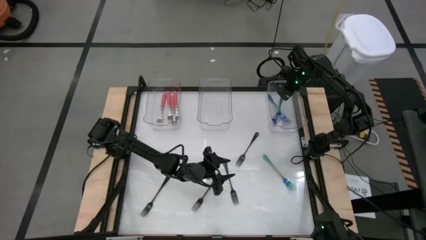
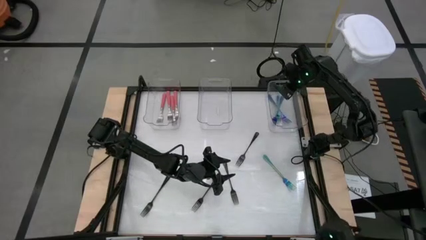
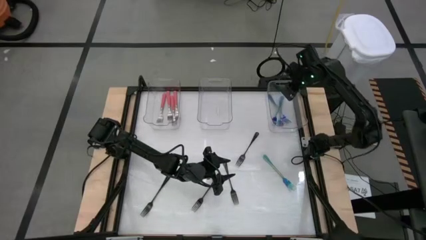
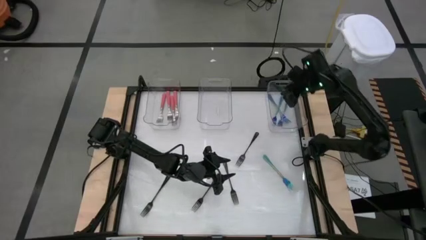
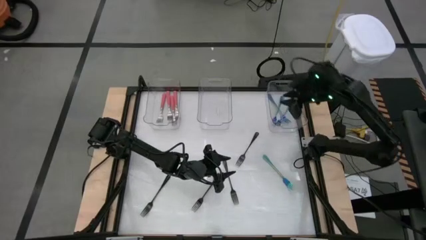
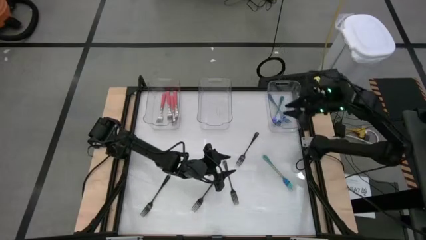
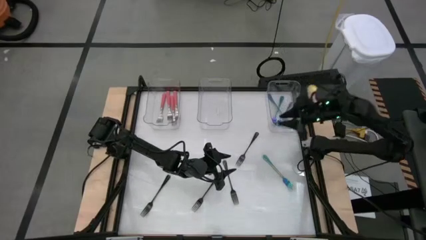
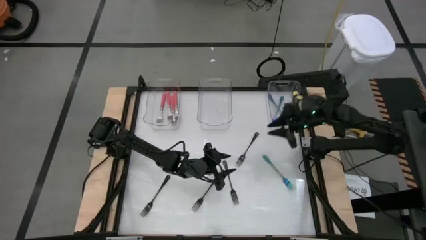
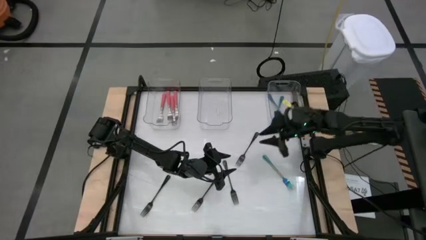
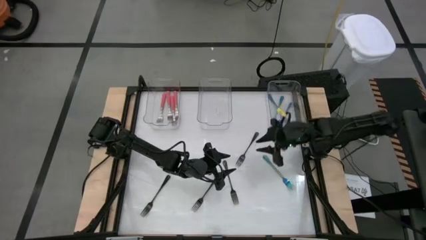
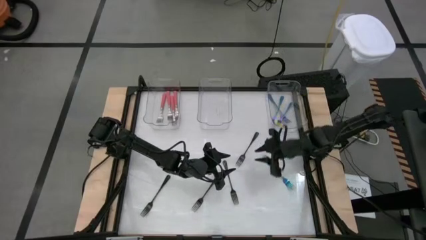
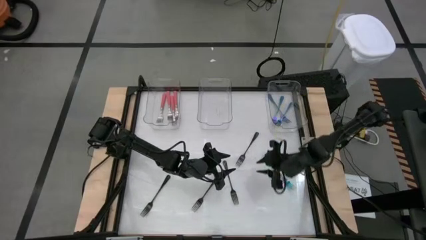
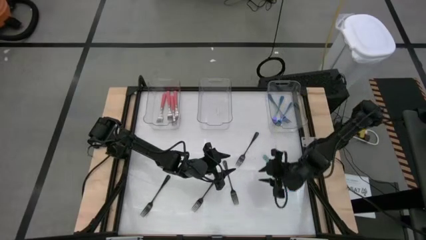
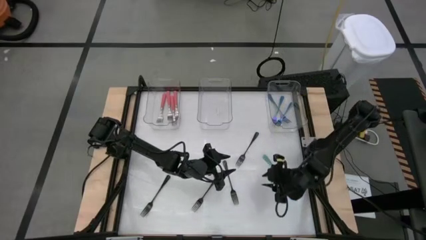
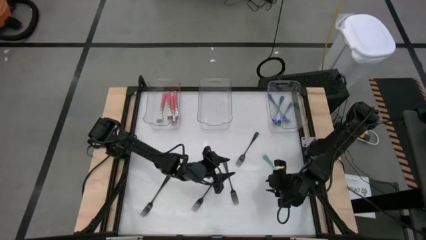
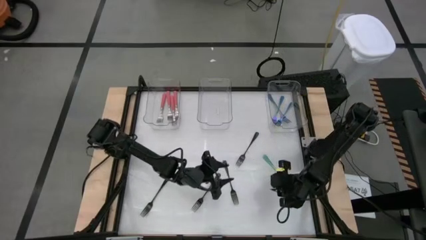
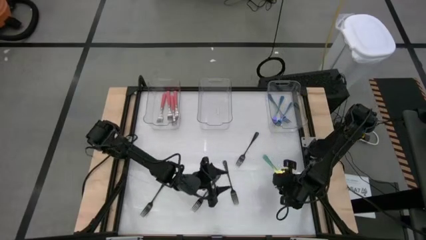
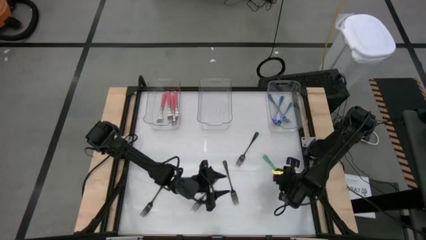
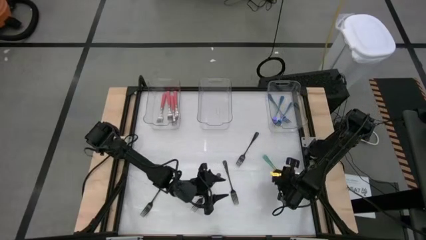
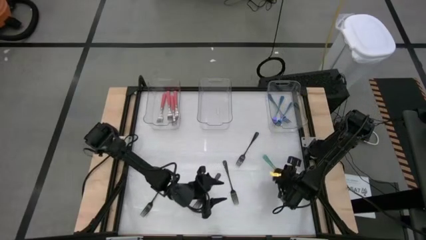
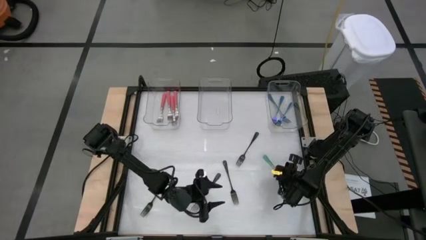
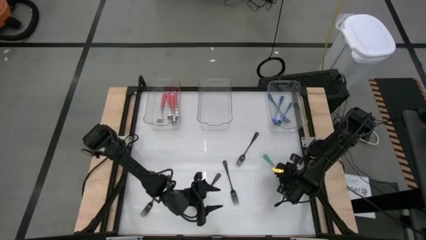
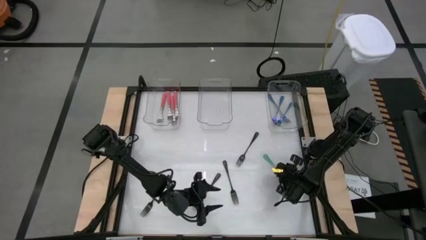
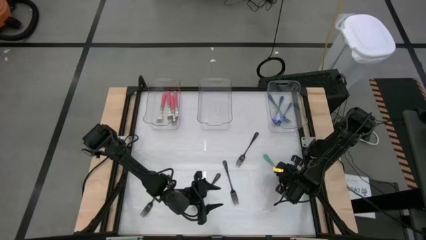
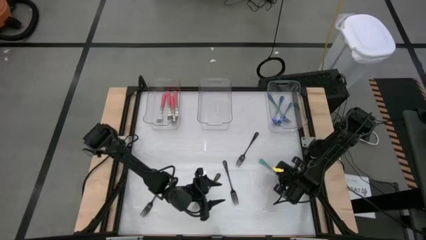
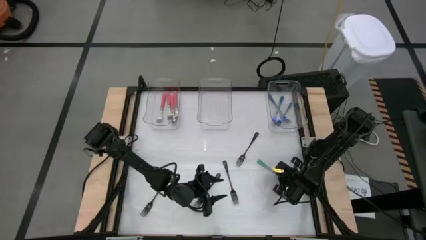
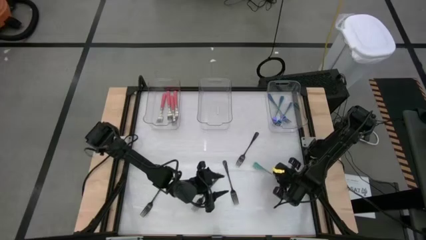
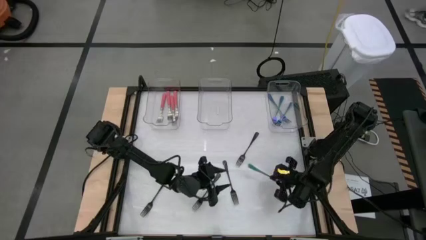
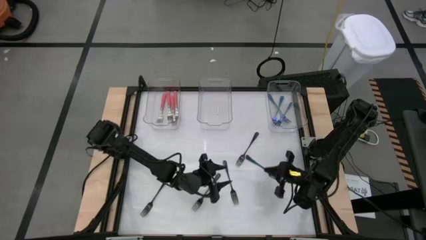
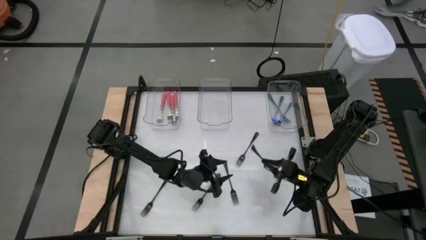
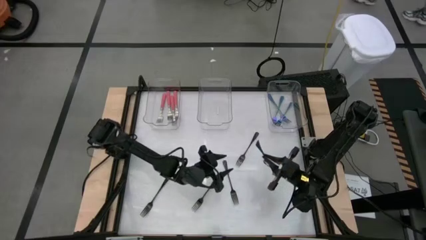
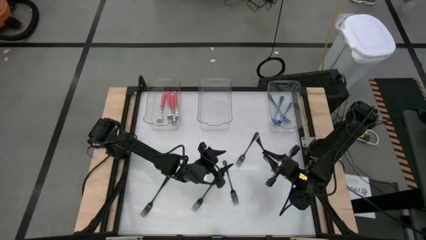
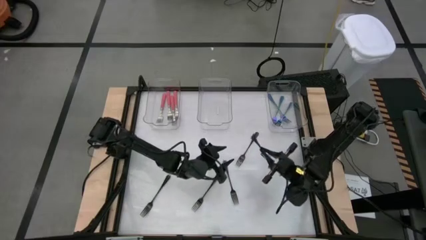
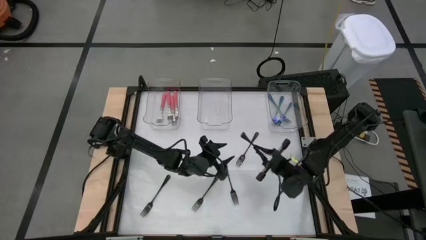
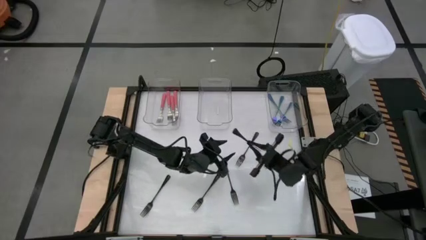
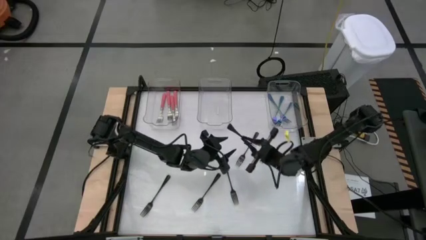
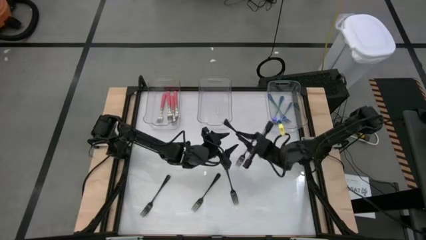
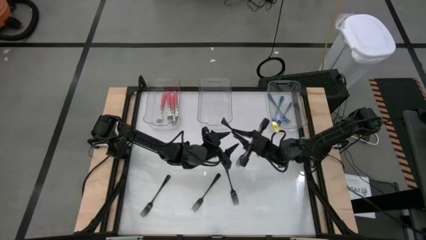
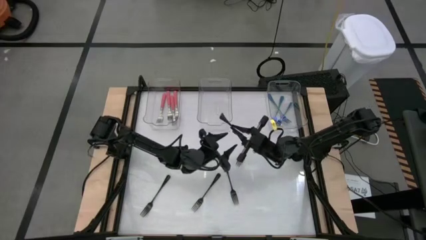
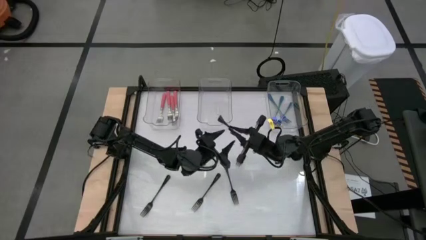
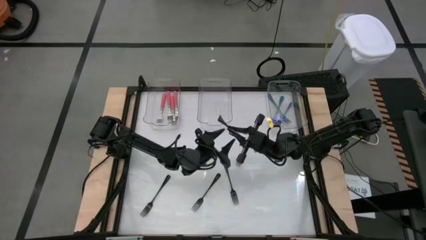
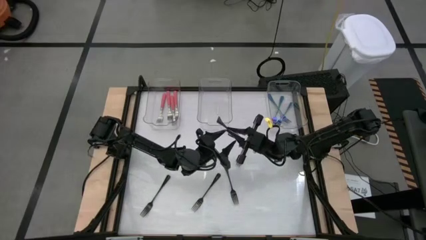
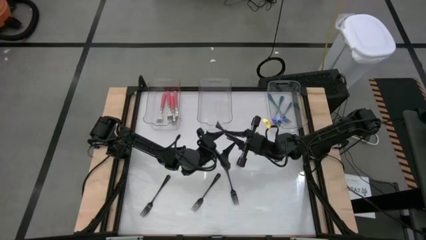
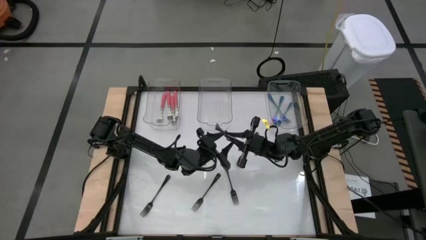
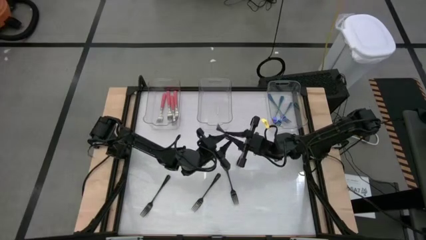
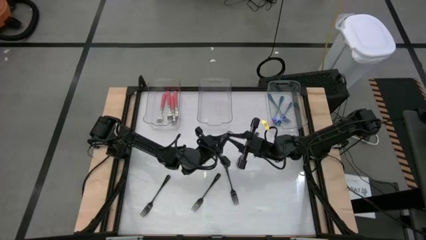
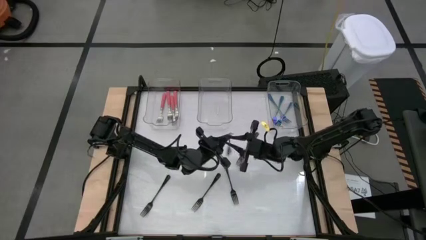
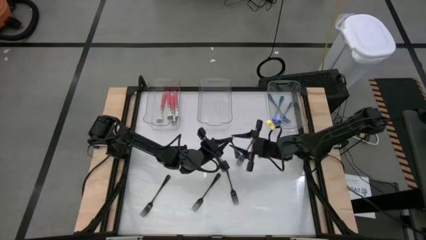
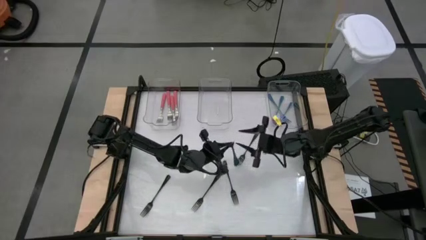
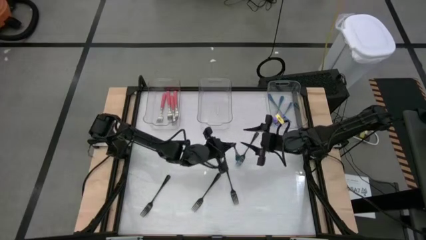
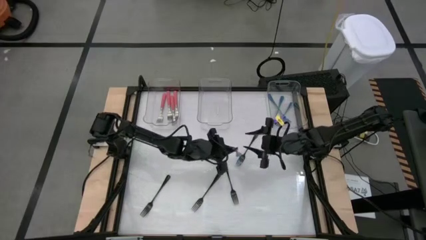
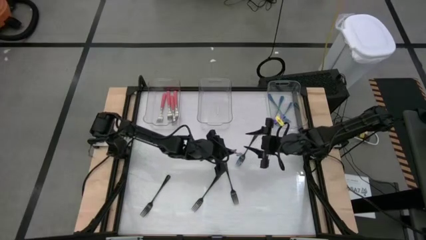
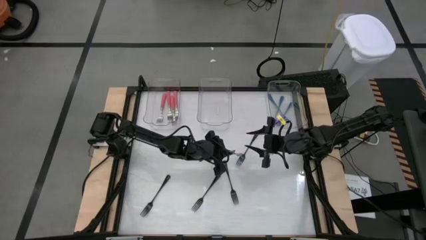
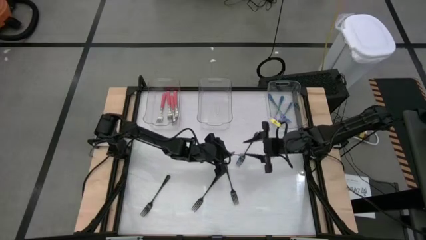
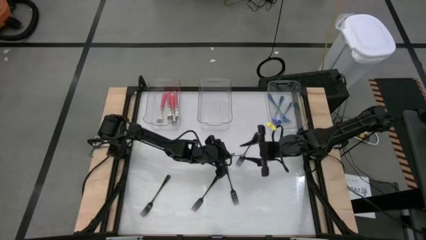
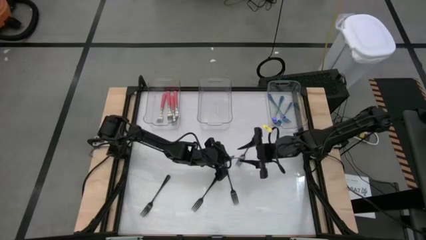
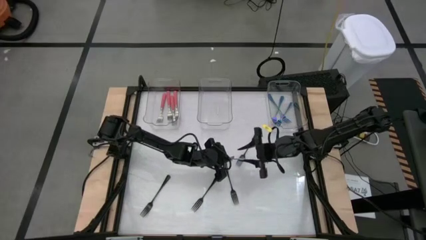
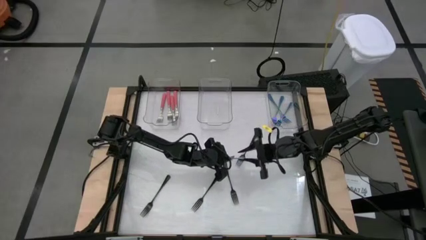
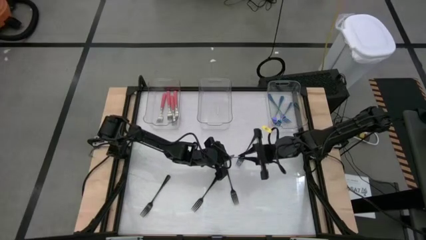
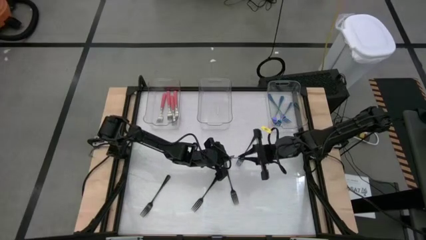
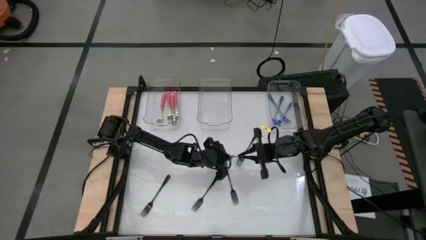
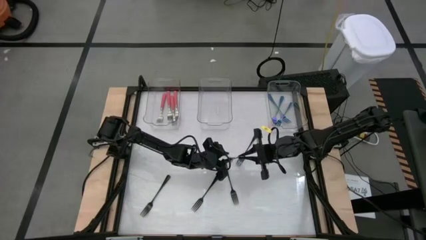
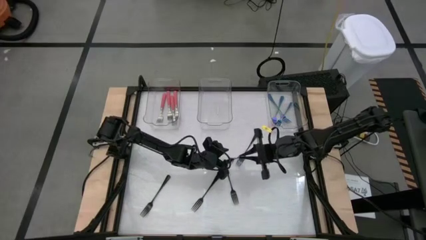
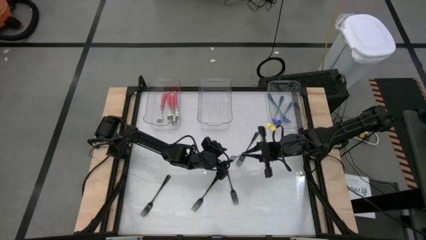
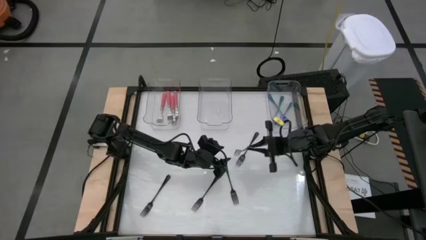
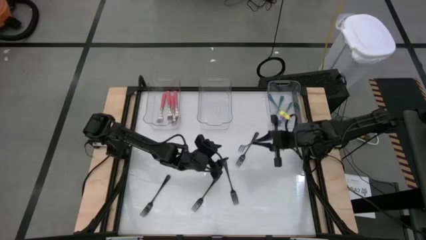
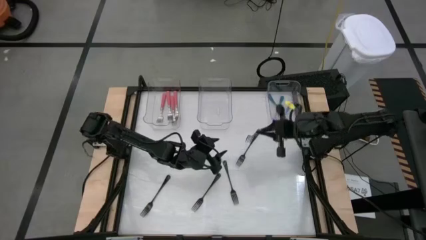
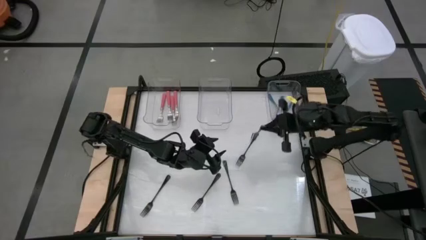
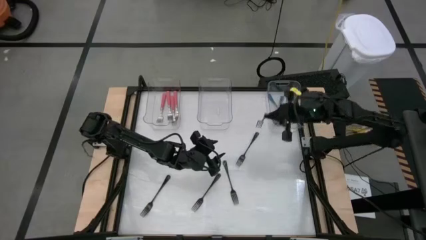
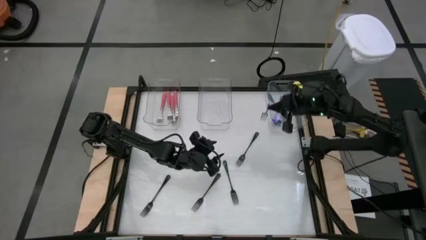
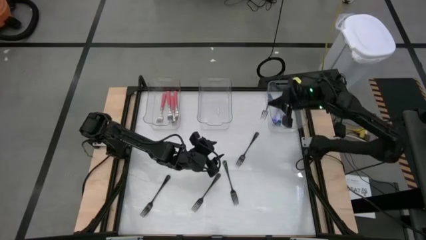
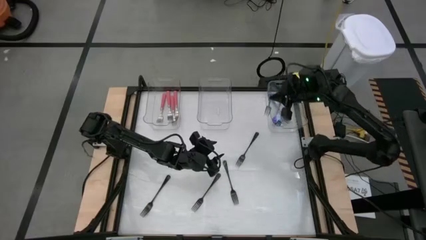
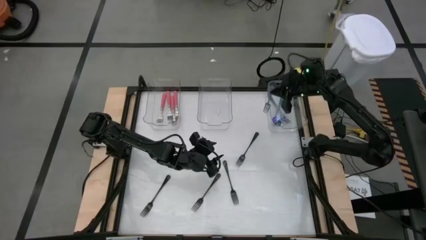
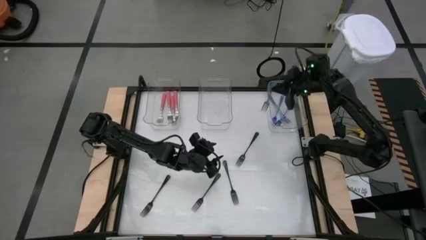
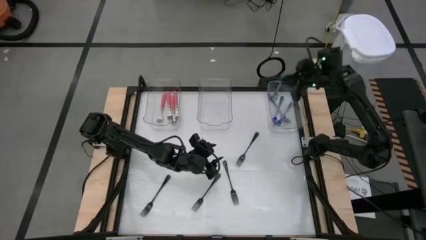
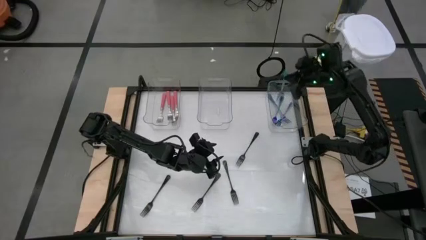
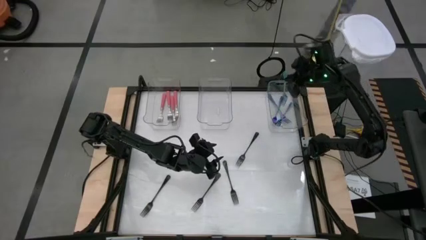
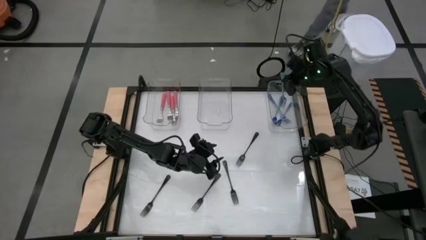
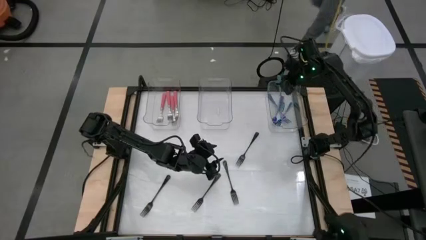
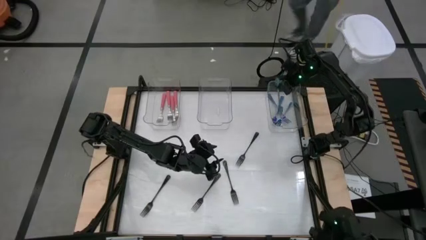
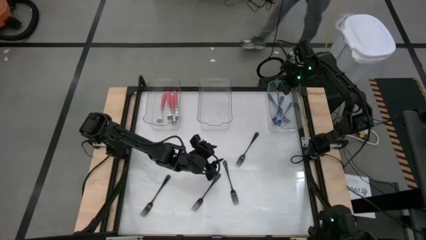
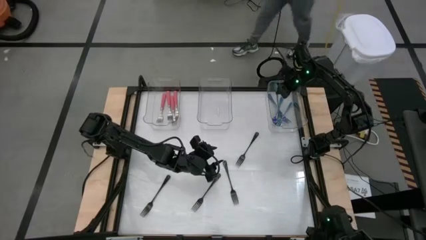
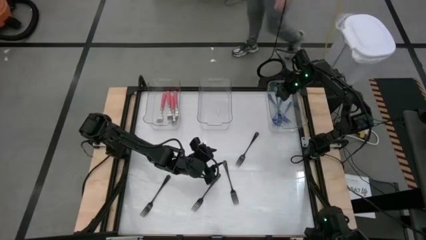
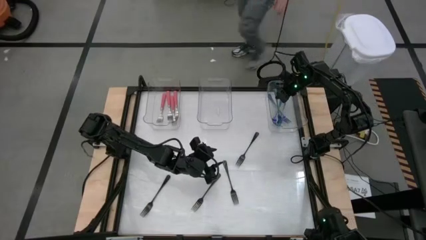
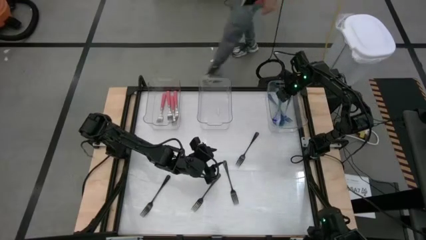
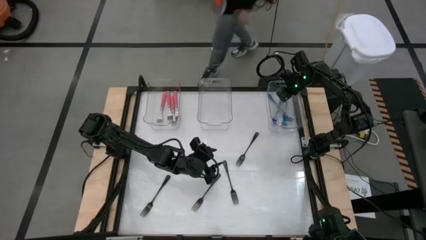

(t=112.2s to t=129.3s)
Task: Sort silverware by color (type)
Put the blue fork into the right transparent bin
